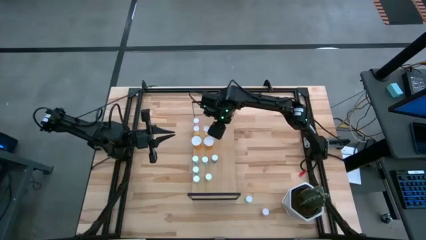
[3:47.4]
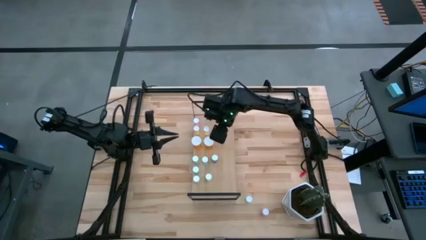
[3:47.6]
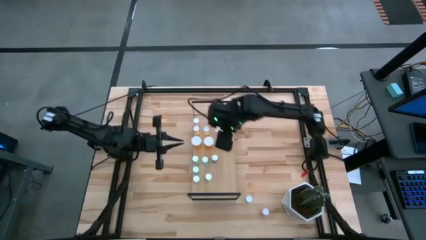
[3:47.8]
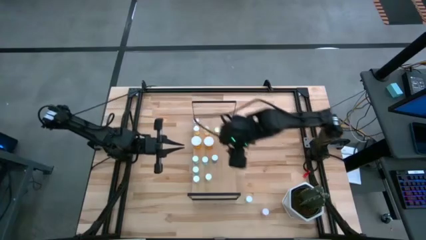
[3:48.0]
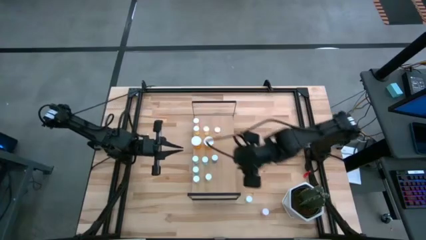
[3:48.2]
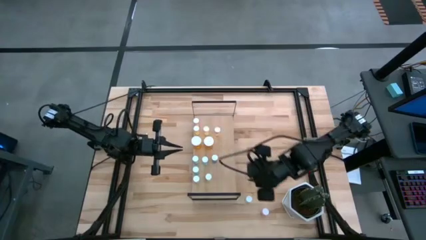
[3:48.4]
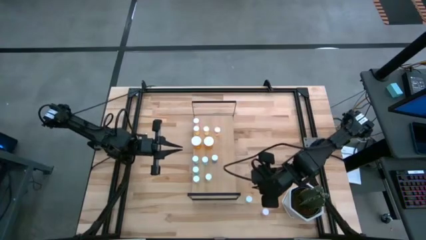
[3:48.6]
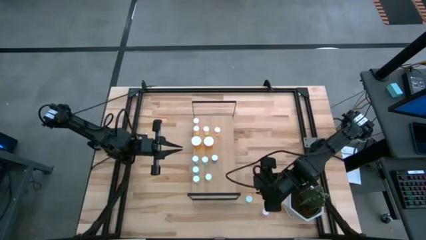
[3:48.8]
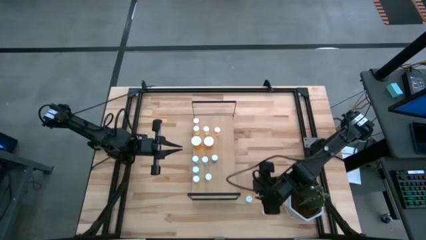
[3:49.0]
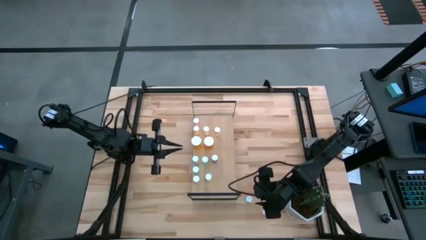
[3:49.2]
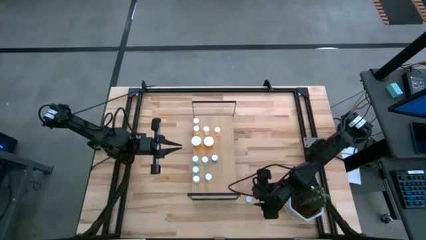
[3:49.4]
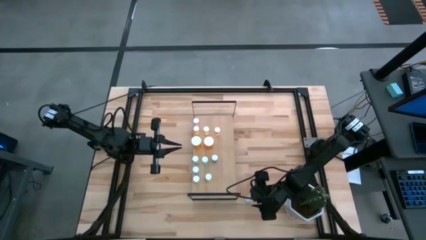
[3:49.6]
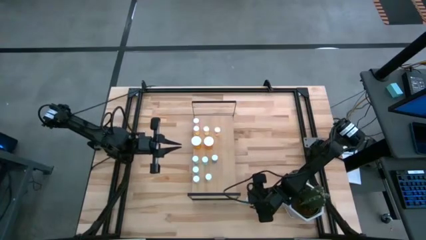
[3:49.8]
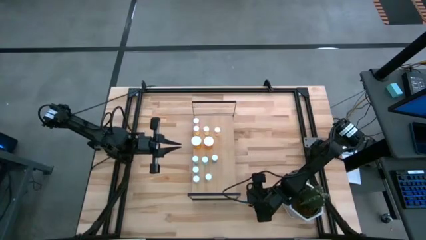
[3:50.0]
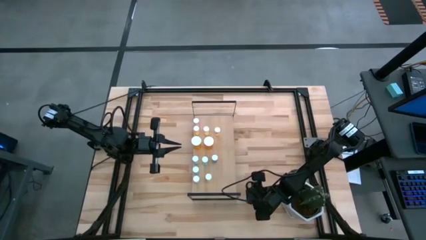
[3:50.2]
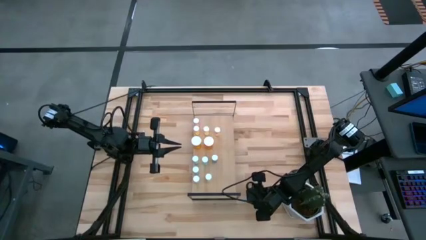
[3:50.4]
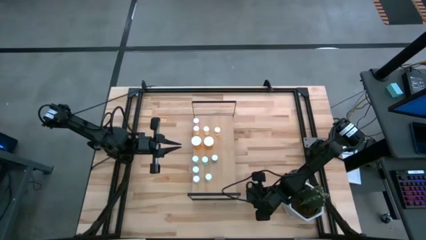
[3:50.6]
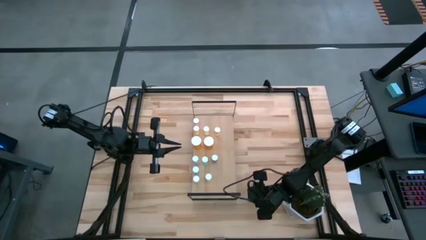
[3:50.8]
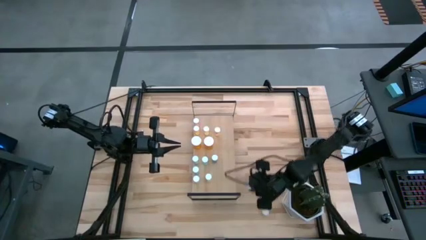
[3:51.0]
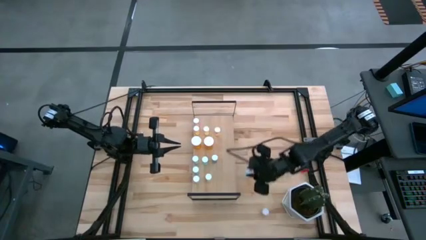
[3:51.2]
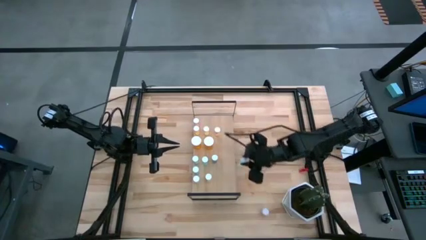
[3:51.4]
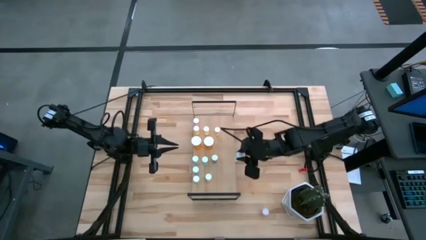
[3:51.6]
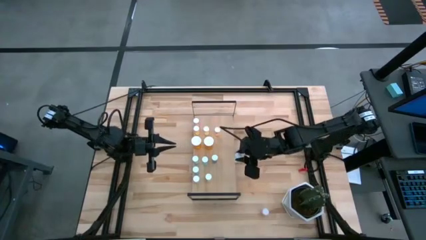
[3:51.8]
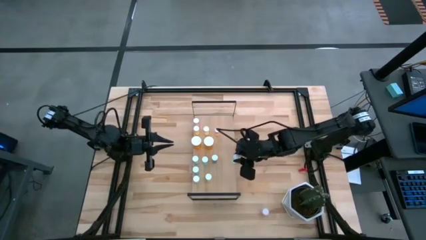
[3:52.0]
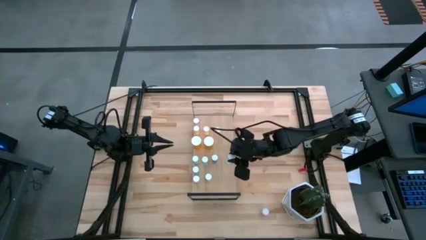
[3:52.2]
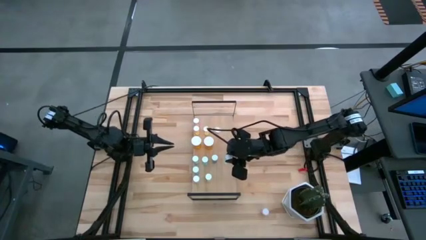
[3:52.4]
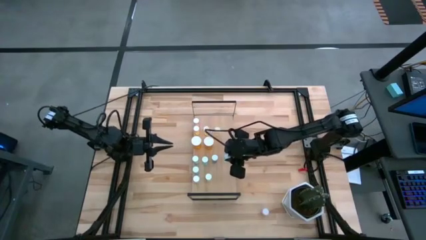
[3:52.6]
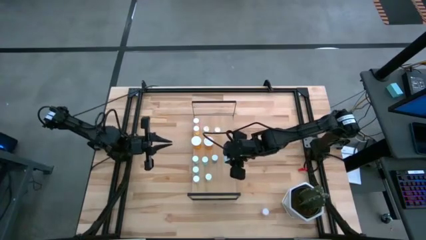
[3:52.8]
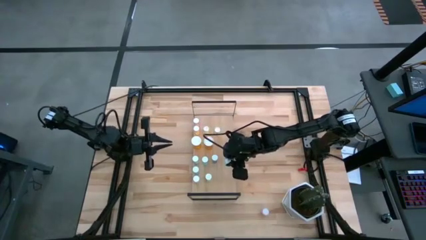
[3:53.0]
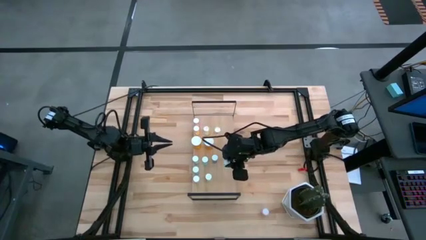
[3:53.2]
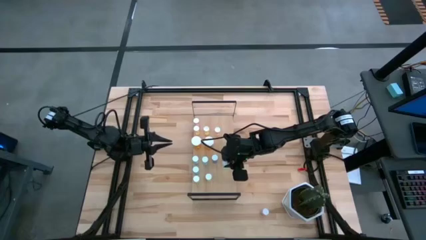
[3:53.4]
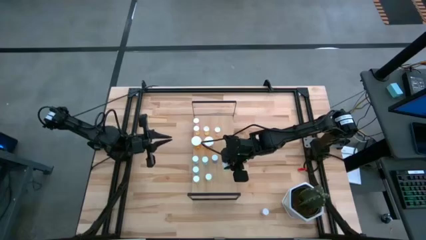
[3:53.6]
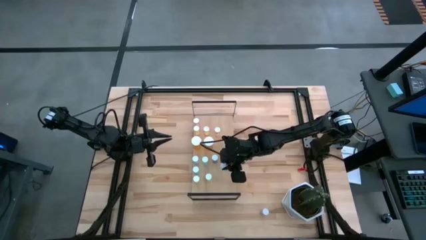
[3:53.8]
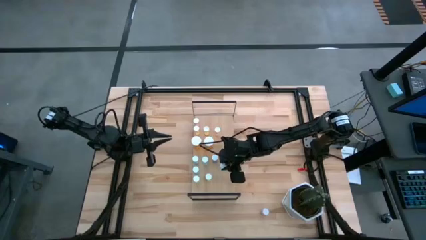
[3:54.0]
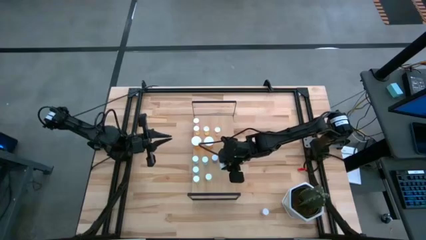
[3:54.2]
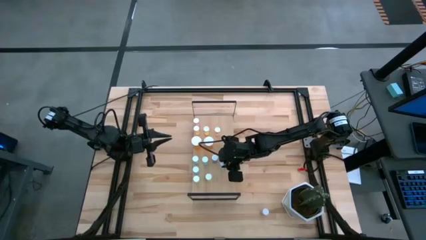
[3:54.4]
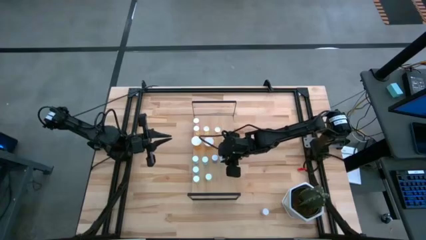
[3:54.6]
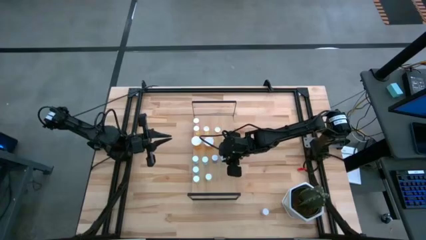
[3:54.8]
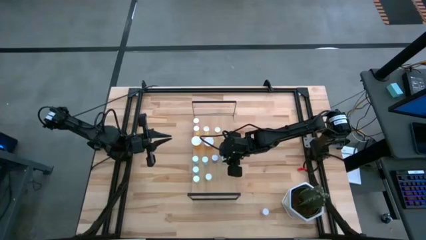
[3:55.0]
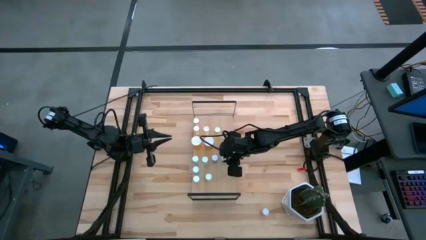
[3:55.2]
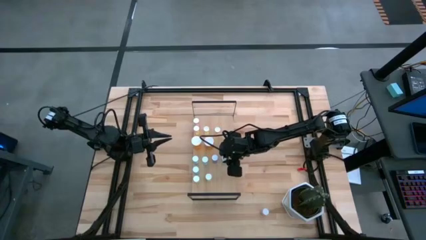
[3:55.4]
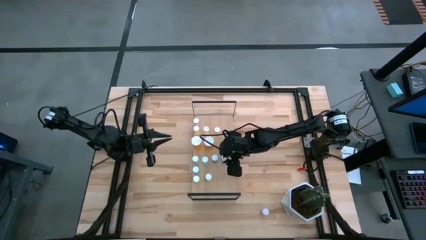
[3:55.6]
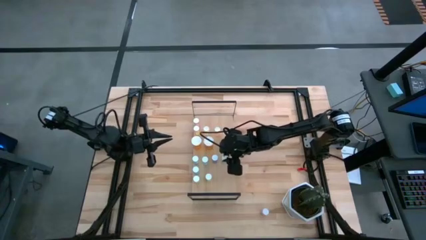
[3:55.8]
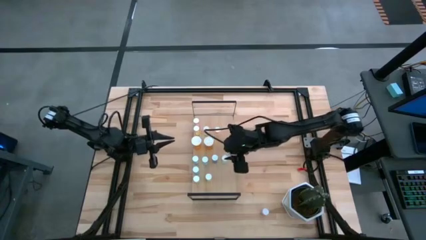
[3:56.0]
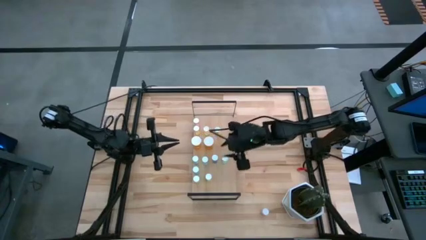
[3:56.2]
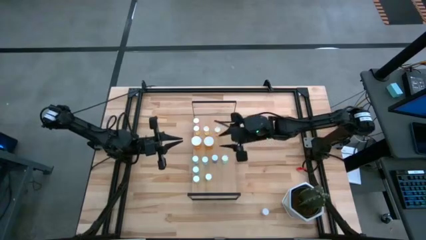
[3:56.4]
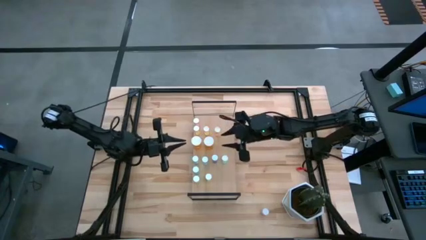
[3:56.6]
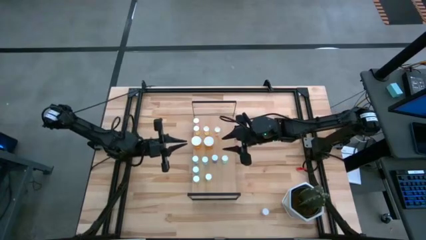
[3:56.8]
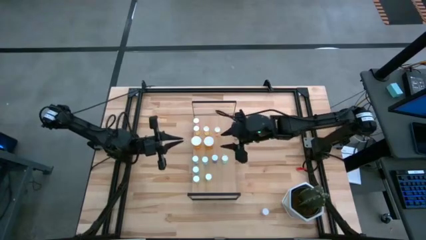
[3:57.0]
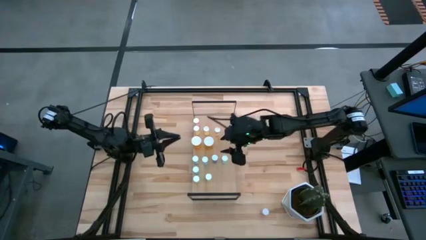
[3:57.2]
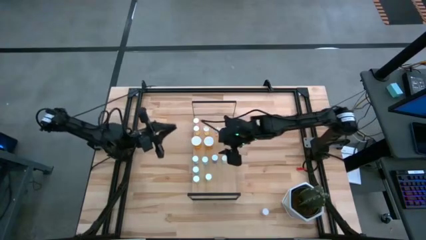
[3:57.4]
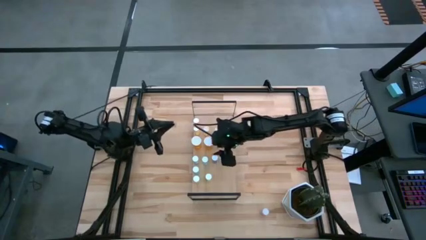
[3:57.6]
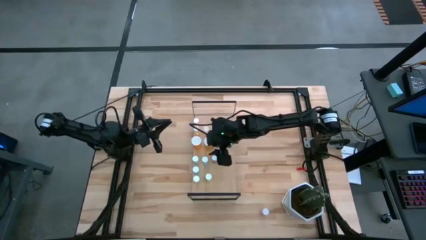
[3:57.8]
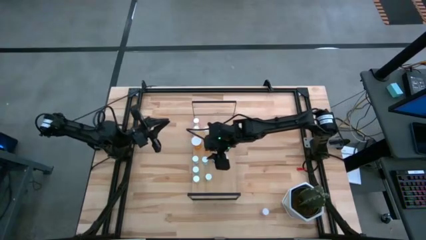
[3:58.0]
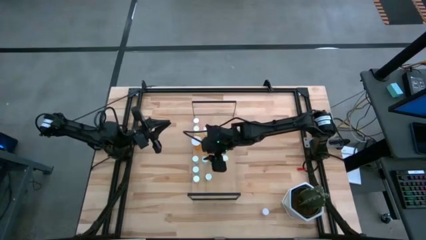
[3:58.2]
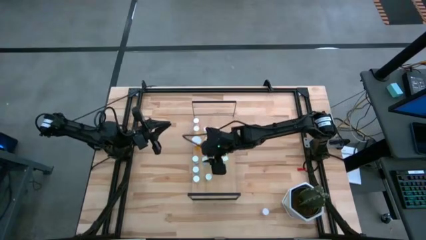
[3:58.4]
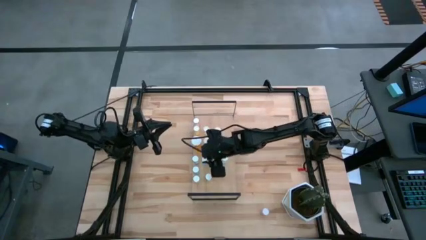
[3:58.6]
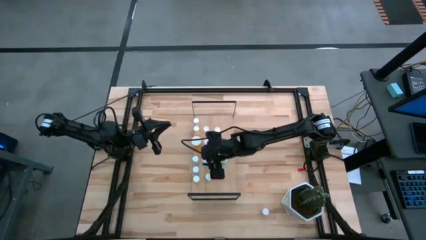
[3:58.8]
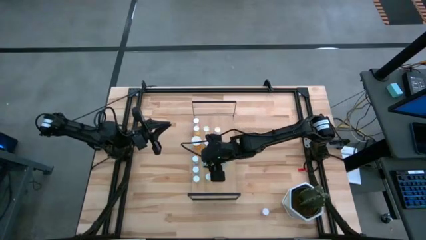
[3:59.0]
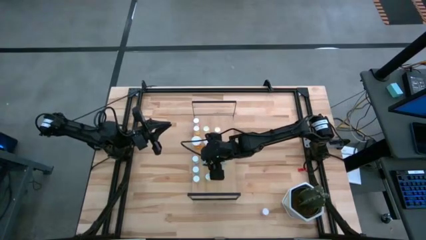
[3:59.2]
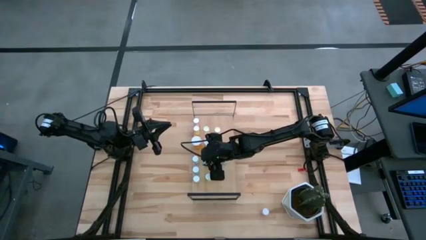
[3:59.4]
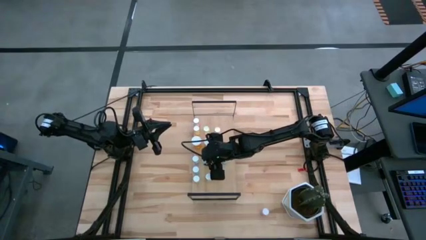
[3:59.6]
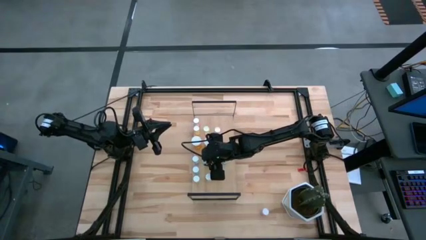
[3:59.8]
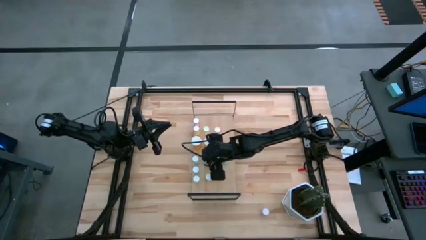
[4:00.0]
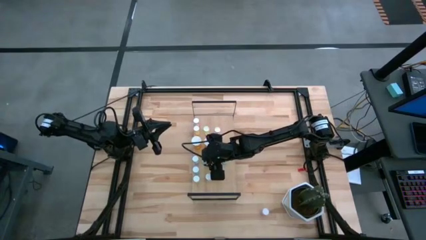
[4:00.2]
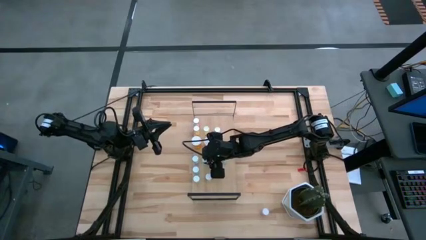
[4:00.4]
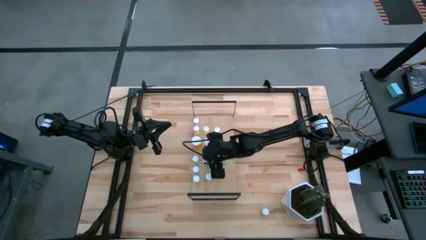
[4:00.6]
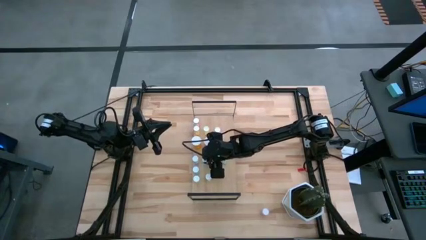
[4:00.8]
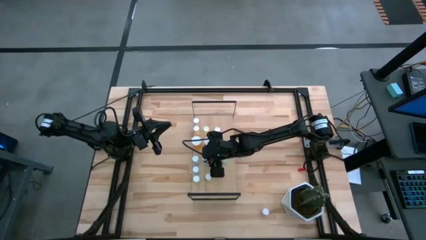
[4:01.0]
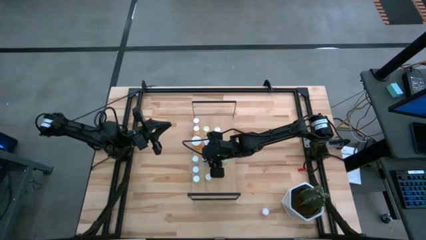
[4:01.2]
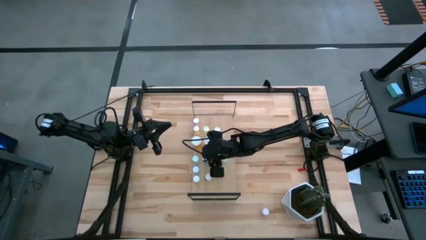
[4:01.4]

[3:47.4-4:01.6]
Task: Pick and place medicine bottles onto shelf by color
Put the green pill bottle on the shelf

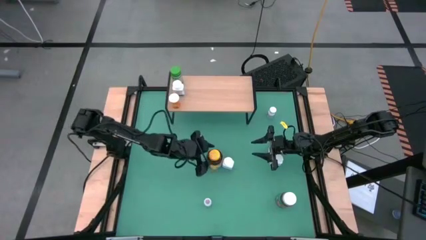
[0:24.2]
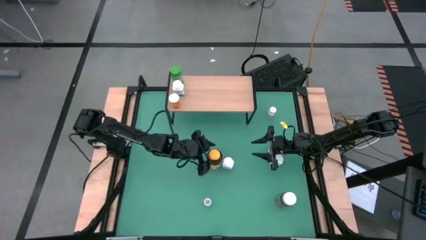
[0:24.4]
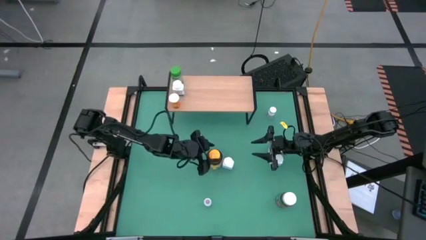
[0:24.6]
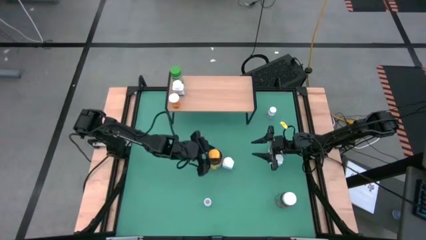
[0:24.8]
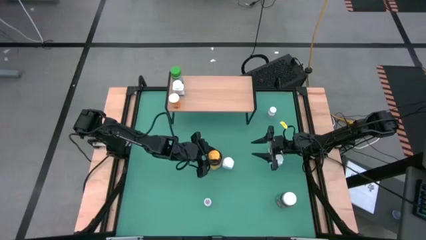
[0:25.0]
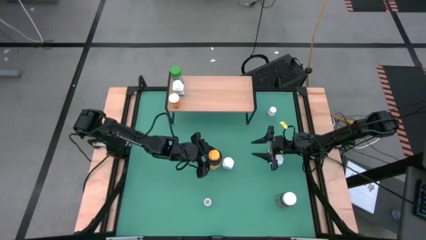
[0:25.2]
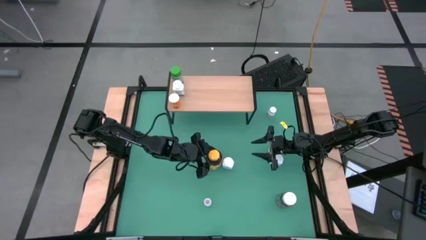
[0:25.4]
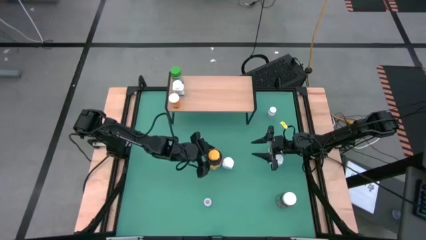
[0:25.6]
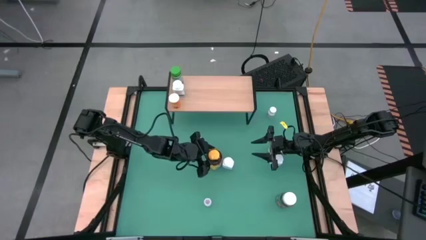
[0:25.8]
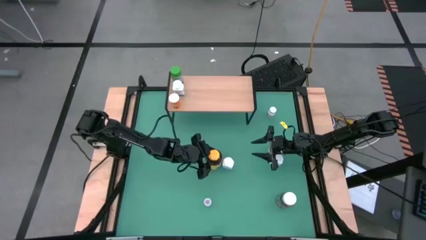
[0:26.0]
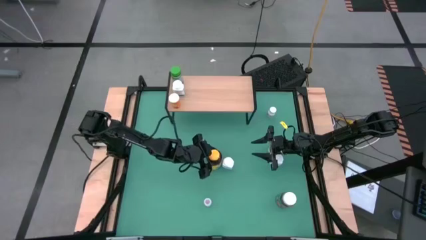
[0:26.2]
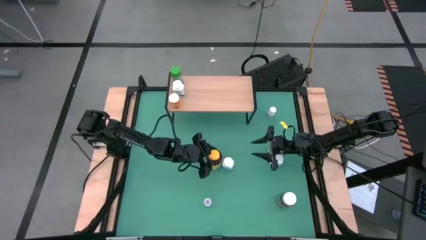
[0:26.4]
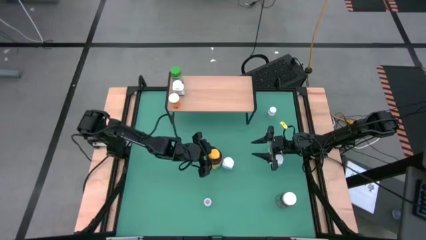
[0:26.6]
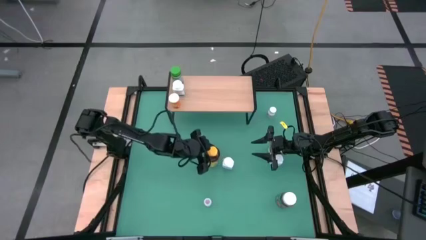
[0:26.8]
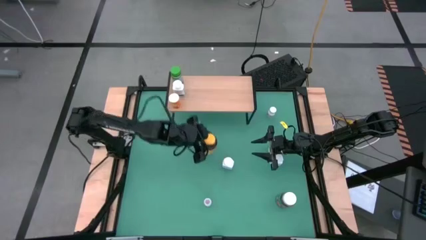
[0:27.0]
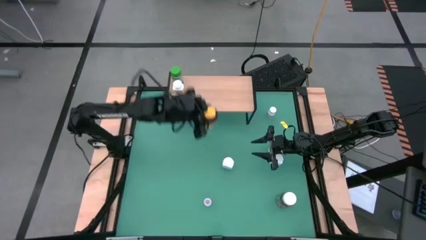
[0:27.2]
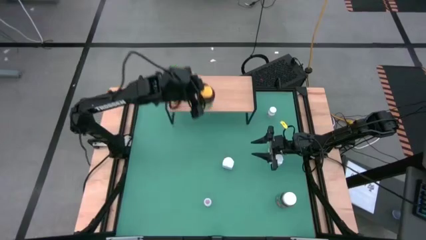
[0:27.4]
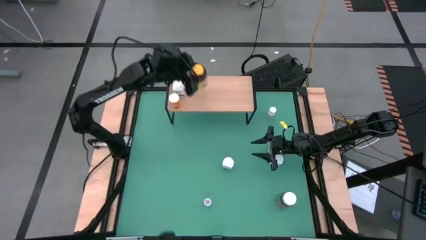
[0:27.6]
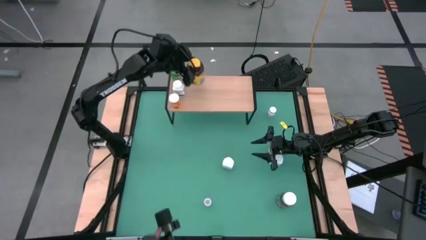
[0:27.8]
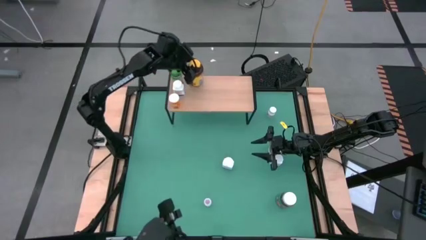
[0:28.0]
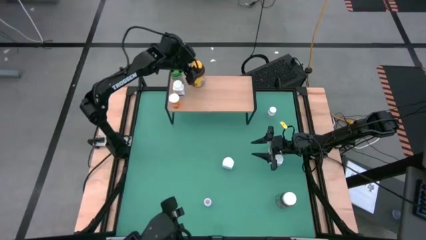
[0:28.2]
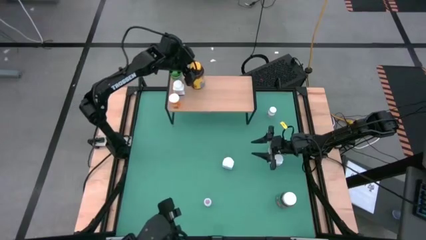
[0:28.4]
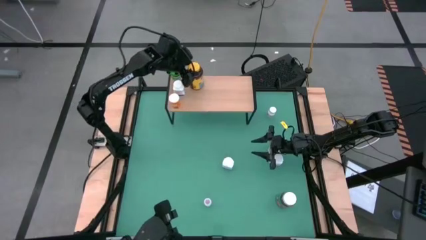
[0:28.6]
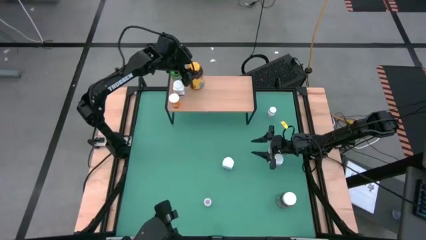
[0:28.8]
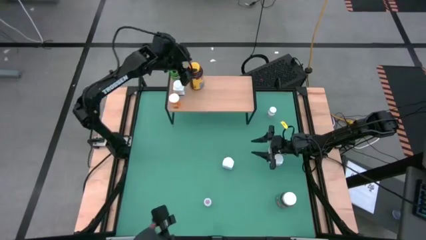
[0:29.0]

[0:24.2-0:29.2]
Task: Pick and place medicine bottles onto shelf by color
Put the yellow pill bottle on the shelf
